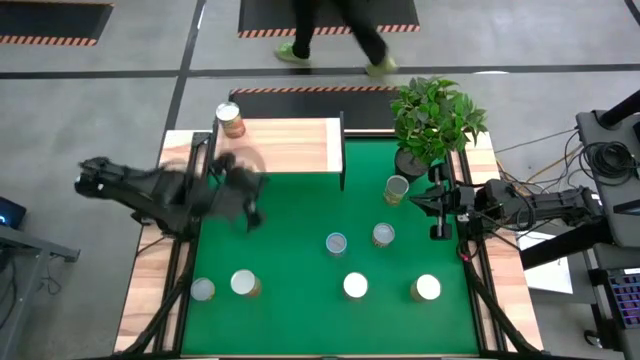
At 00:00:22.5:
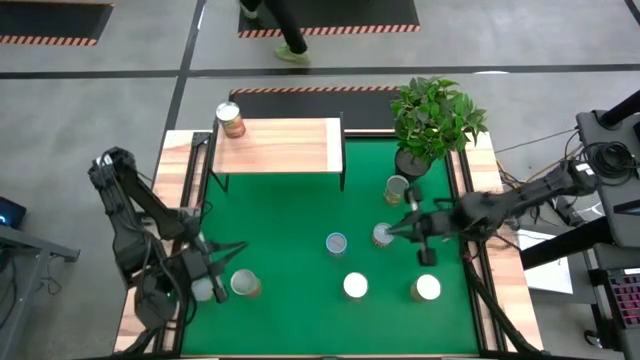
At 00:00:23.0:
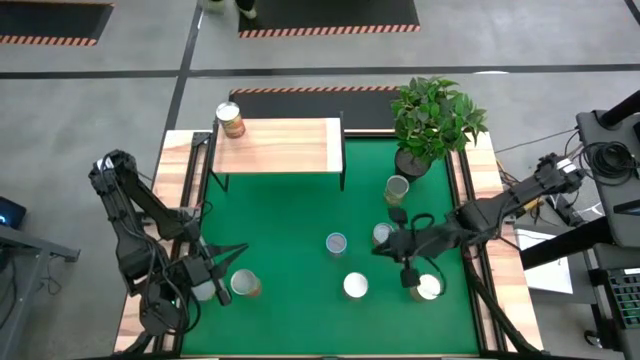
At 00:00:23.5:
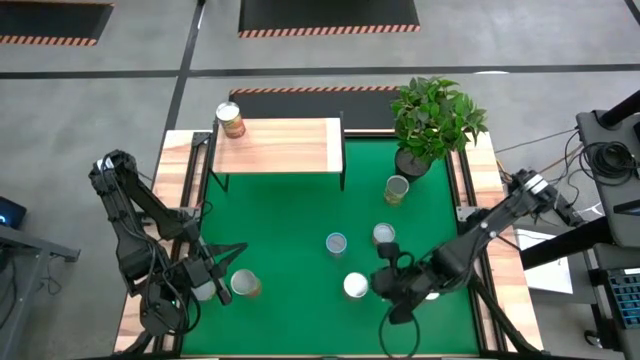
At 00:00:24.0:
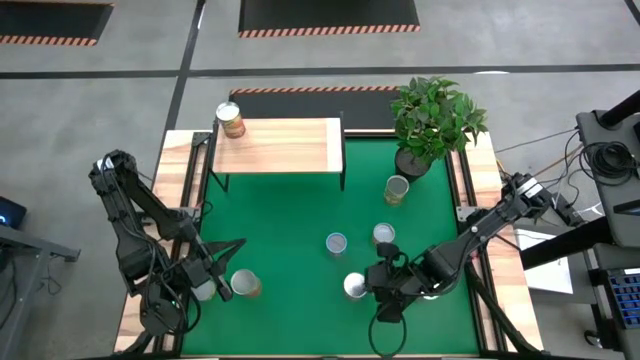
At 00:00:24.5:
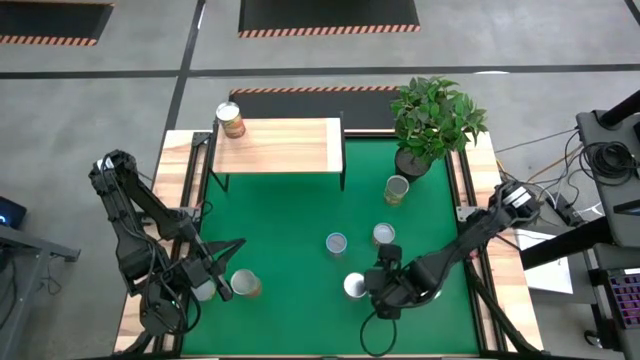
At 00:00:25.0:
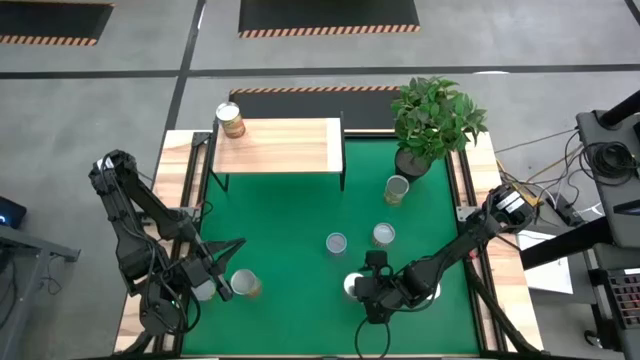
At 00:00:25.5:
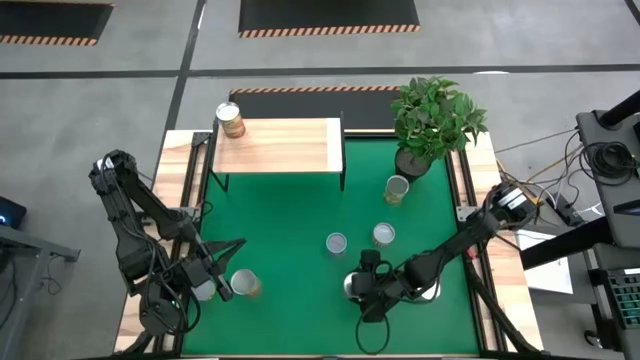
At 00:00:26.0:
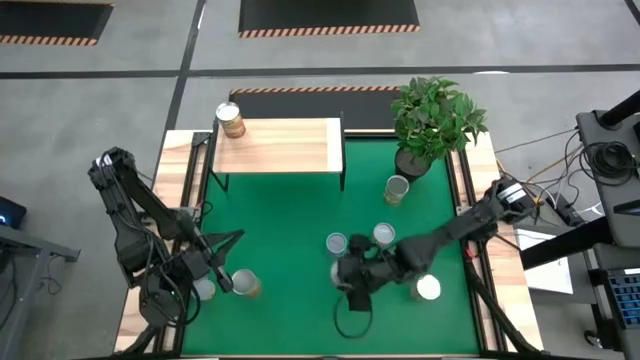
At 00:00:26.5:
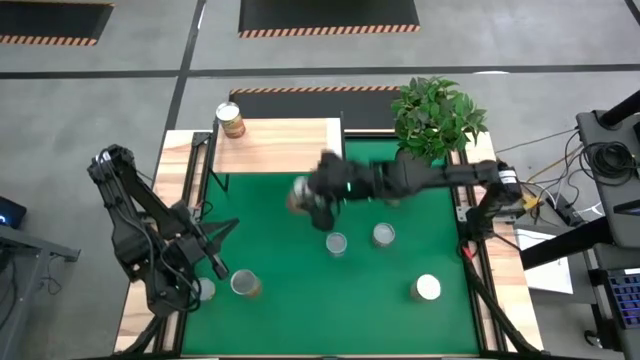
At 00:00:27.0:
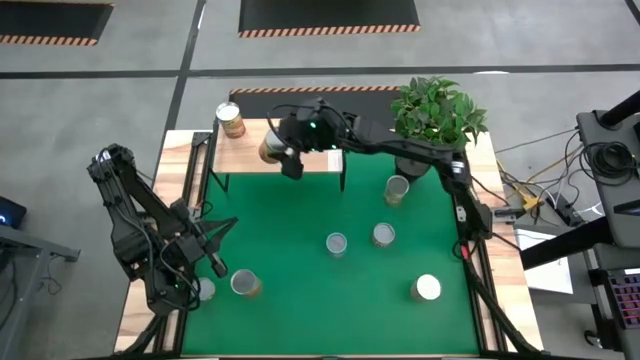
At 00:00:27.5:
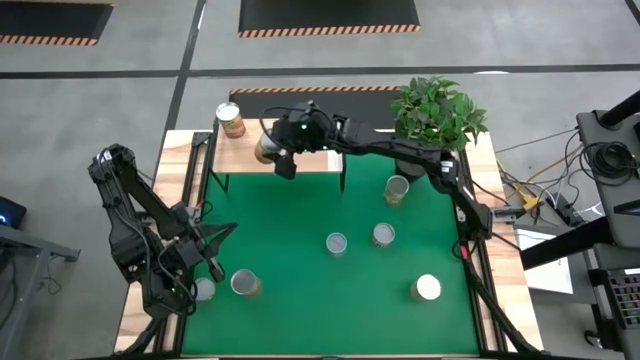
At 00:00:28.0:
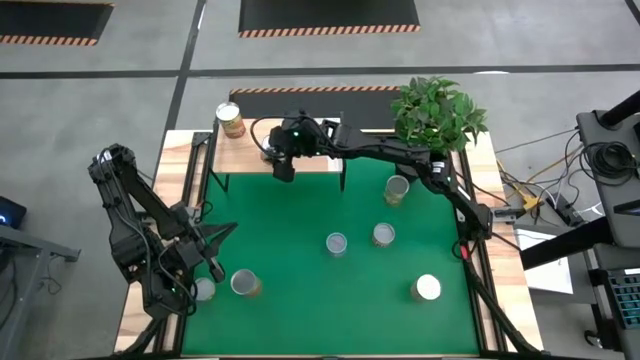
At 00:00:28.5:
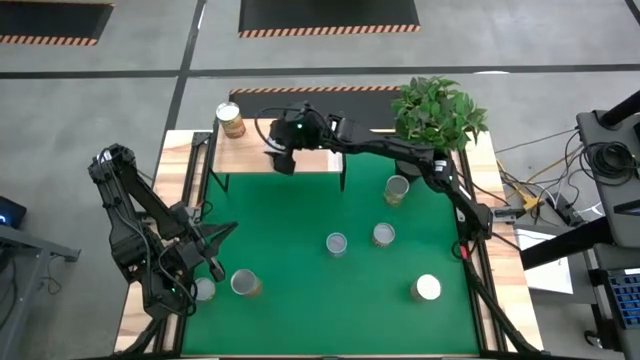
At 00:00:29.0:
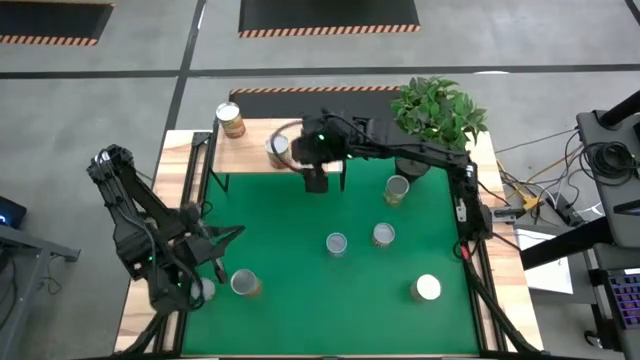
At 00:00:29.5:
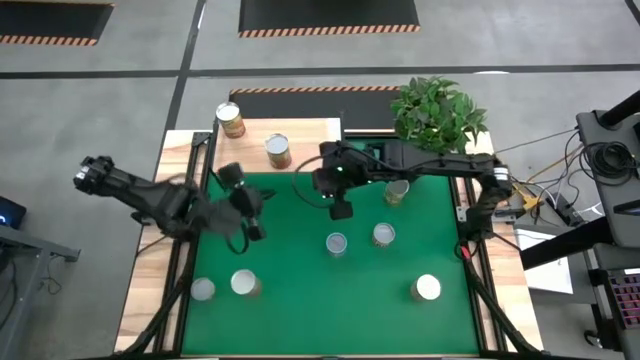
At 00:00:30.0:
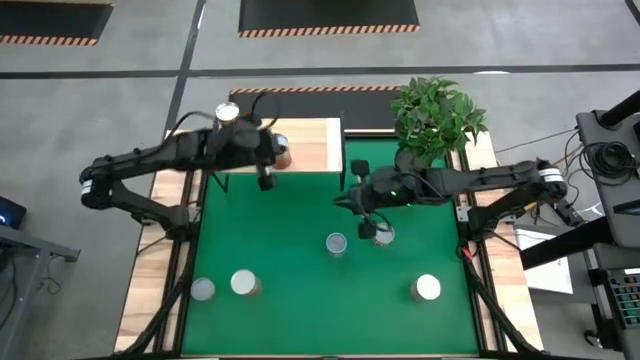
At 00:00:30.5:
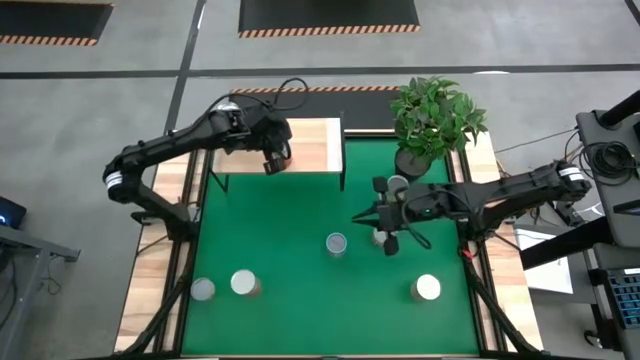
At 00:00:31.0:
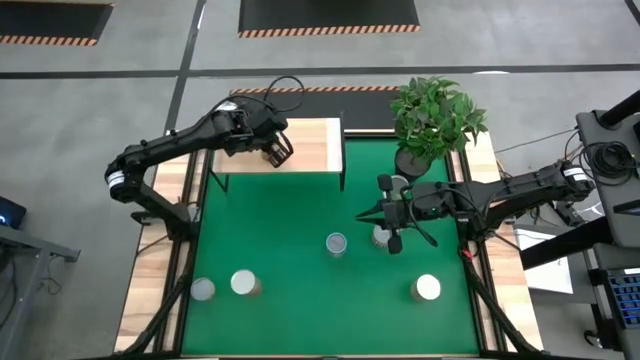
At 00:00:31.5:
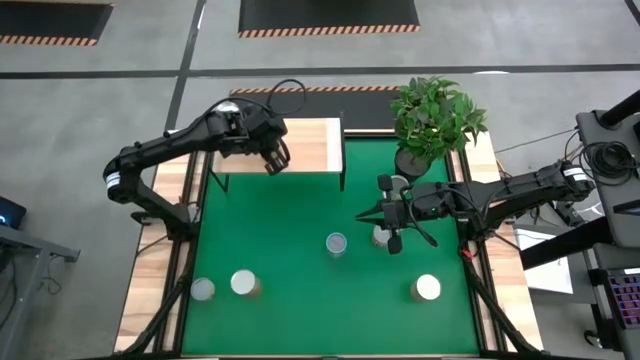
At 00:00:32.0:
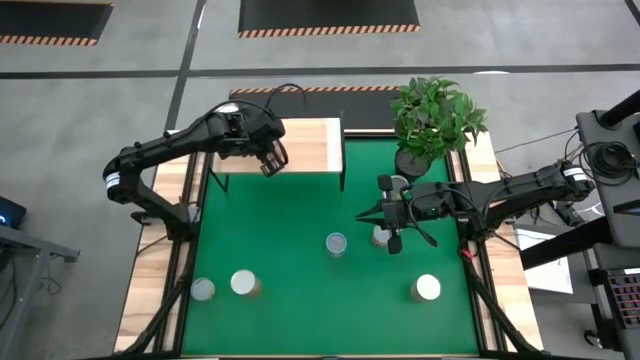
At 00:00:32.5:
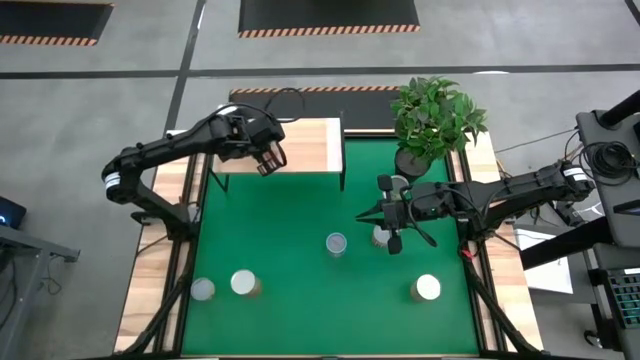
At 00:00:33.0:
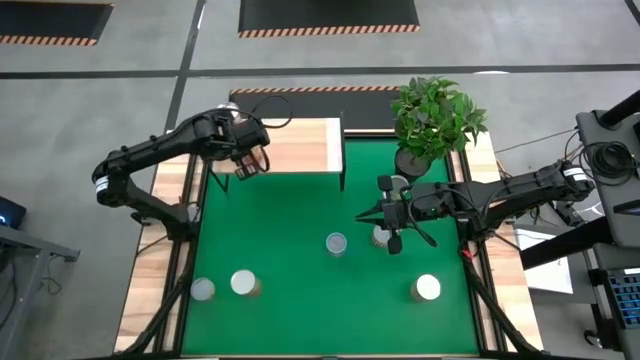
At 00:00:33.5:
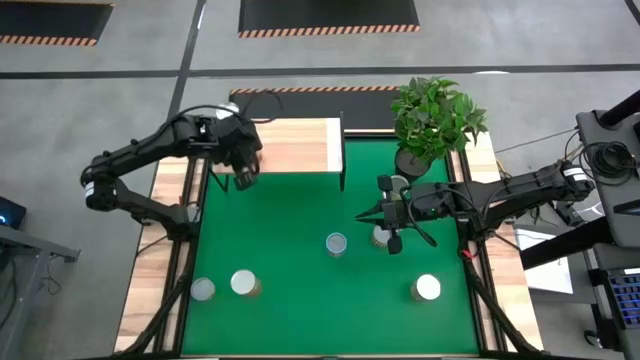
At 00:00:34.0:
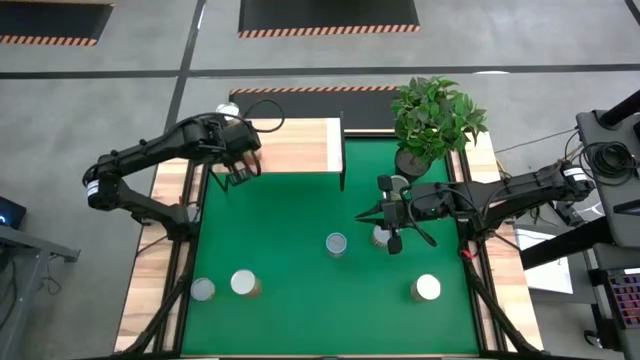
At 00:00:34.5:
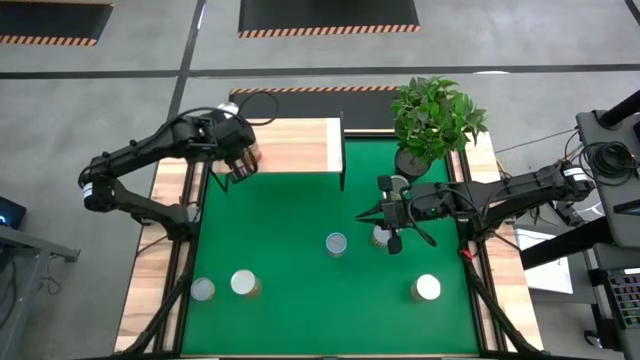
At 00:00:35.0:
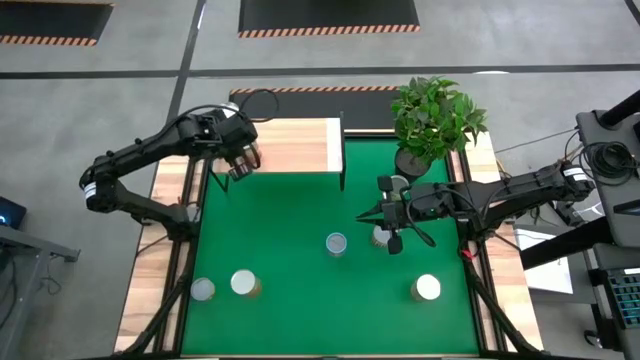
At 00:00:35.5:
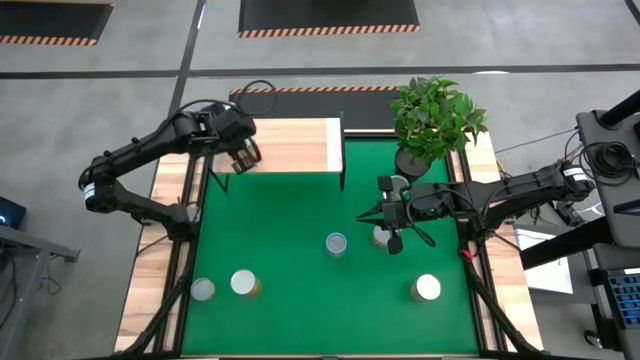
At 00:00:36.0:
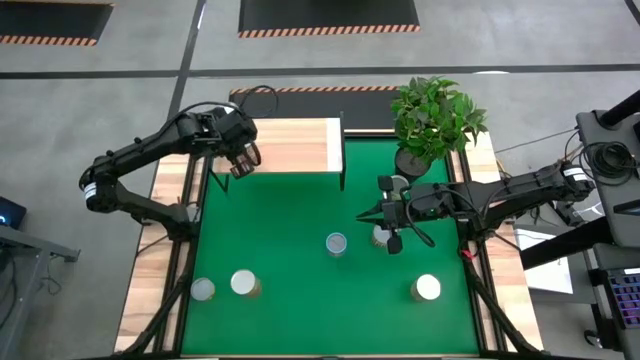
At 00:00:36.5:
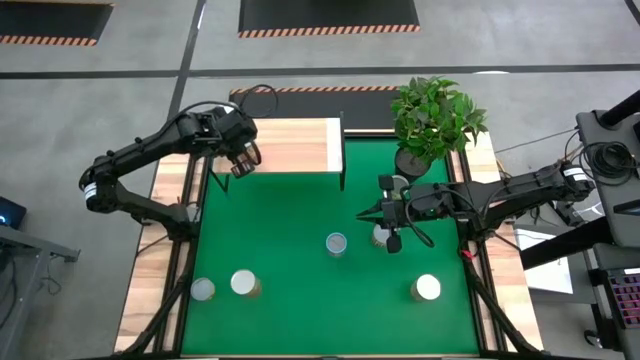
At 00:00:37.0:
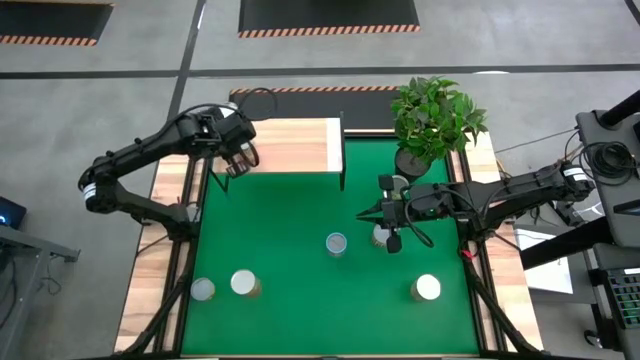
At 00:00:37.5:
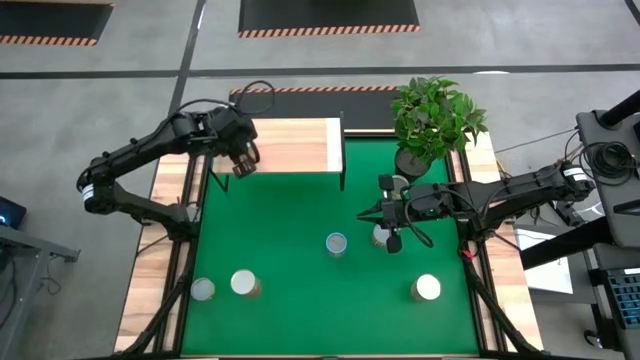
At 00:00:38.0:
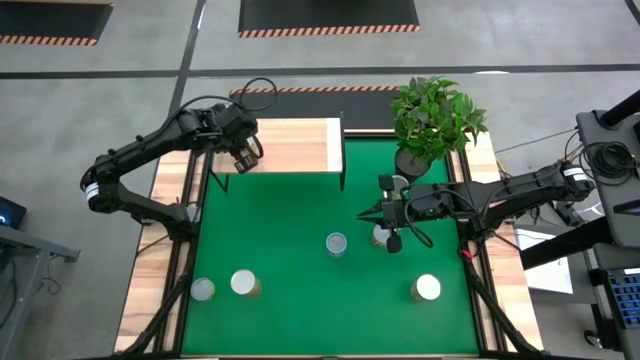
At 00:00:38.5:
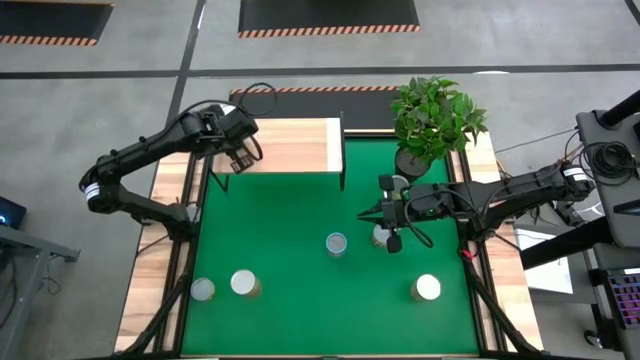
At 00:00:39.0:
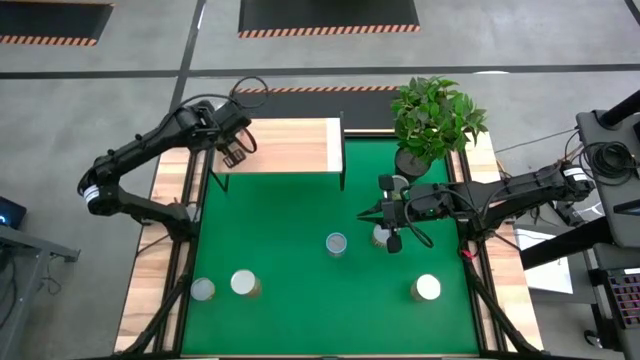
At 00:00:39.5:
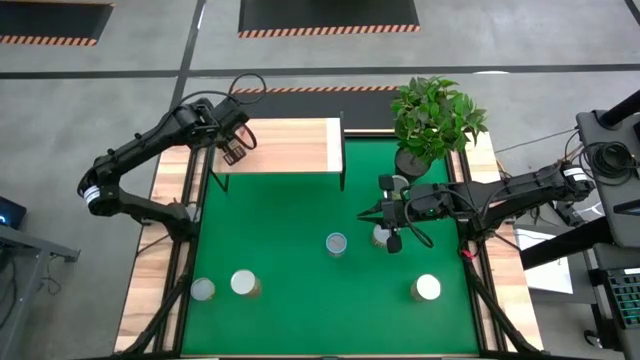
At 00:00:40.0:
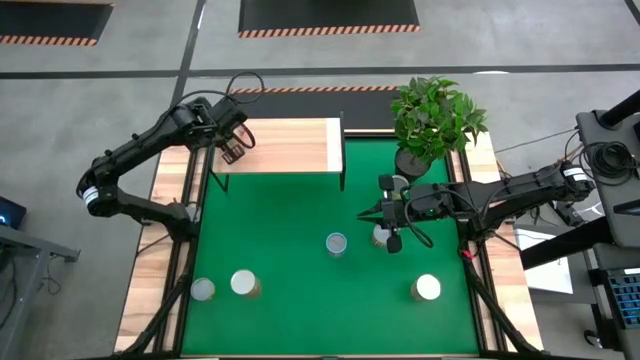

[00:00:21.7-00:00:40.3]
Task: Pick and place cans onto a shelf
Put the center orange can on the shelf aligned with the other orange can

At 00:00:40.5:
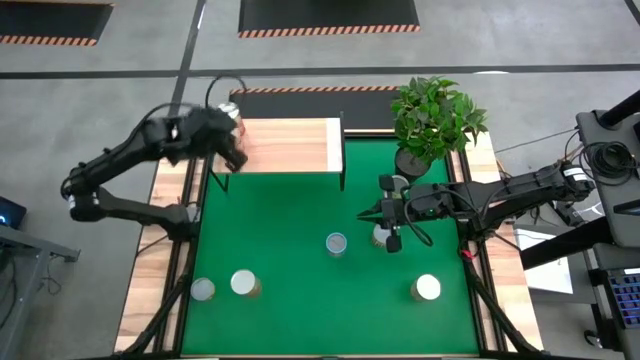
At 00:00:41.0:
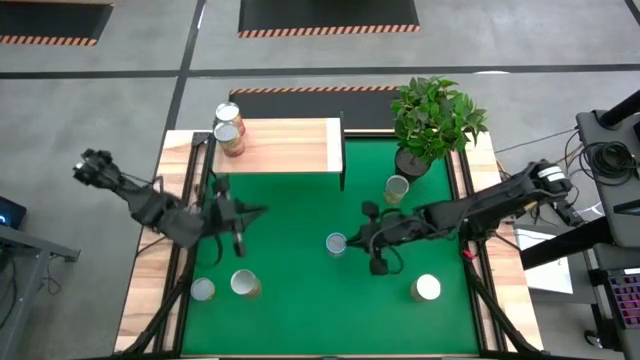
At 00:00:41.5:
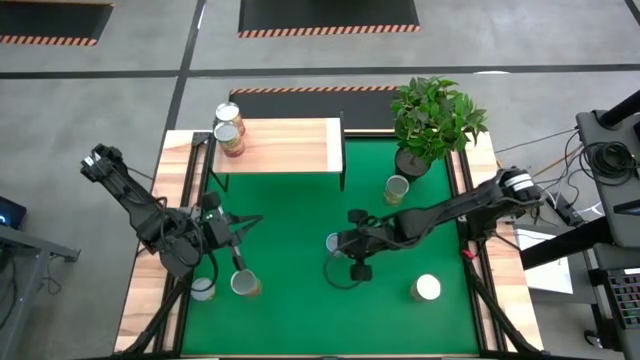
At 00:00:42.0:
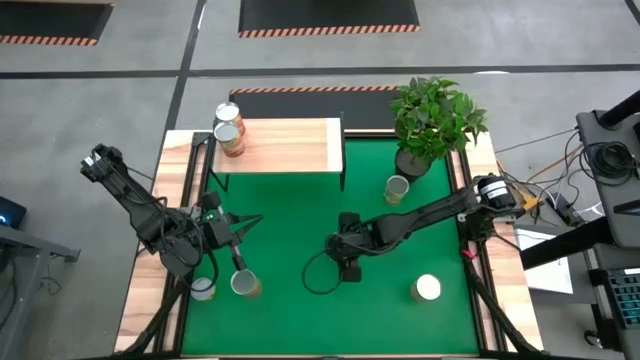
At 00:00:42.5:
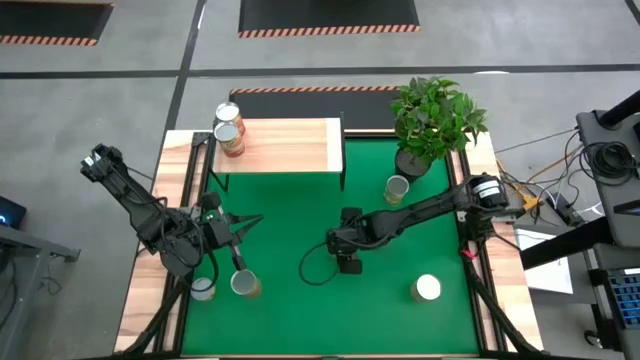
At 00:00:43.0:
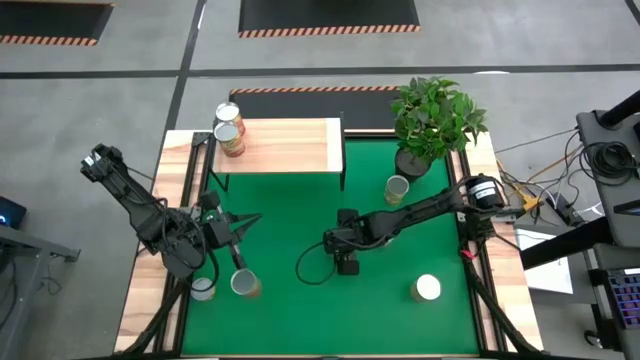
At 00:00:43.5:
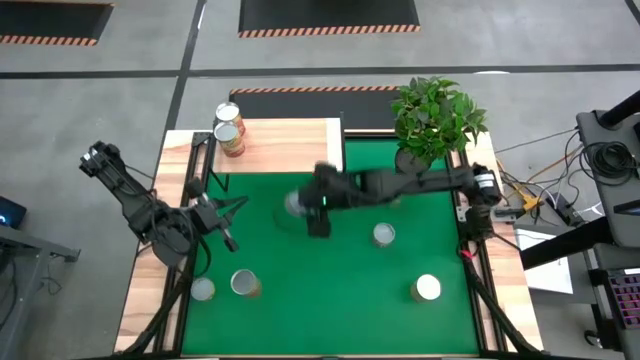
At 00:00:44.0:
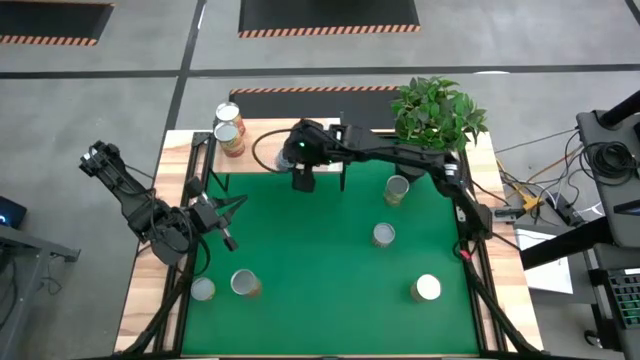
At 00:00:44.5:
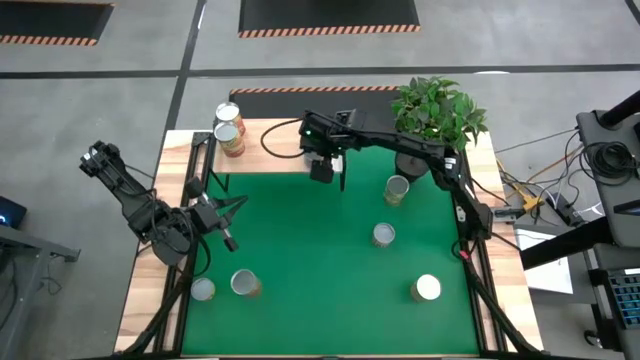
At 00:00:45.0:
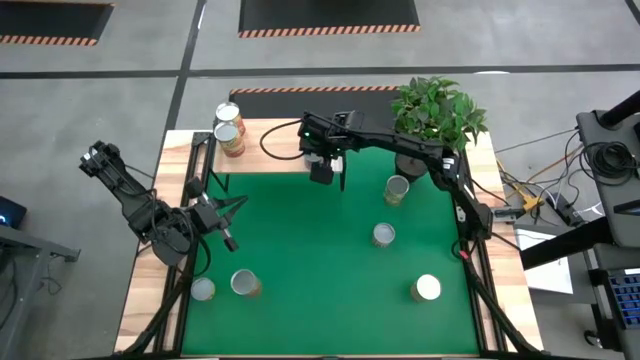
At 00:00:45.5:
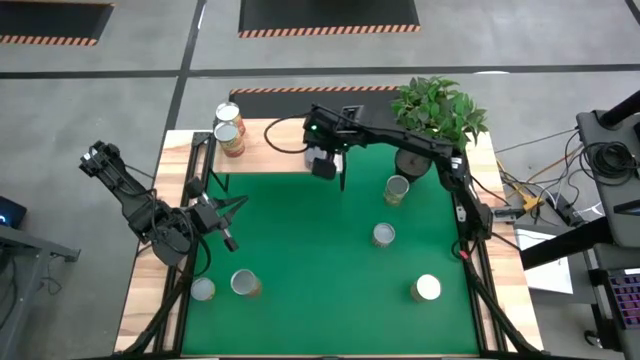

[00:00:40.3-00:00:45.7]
Put the pink can on the shelf
